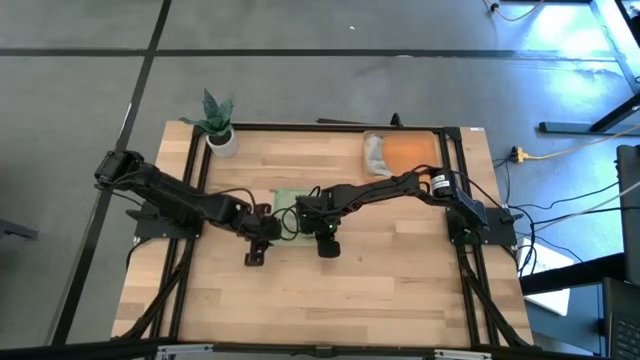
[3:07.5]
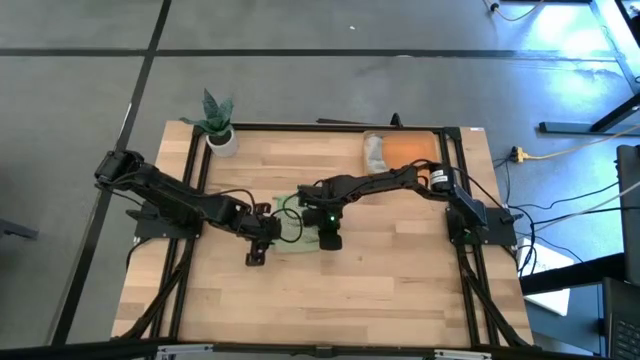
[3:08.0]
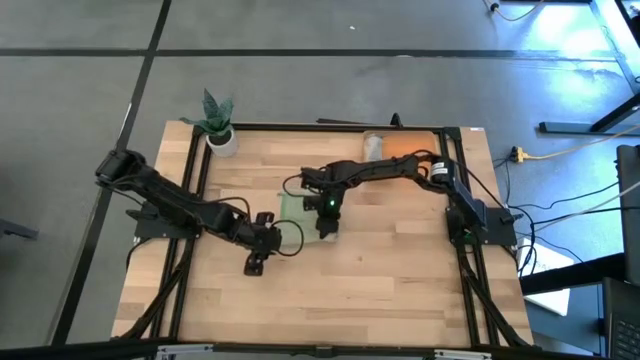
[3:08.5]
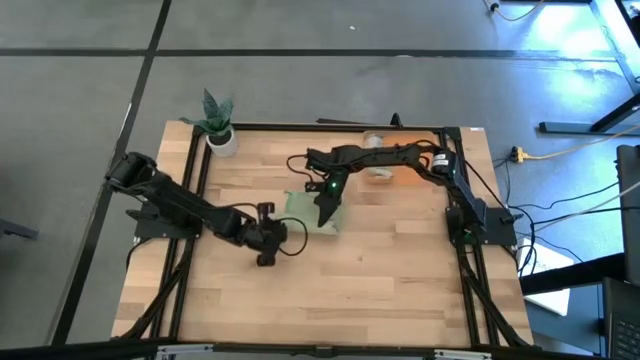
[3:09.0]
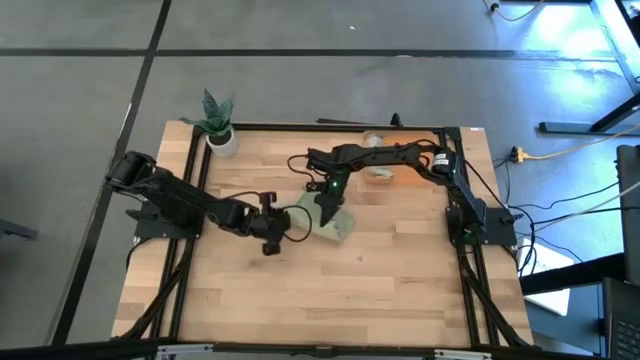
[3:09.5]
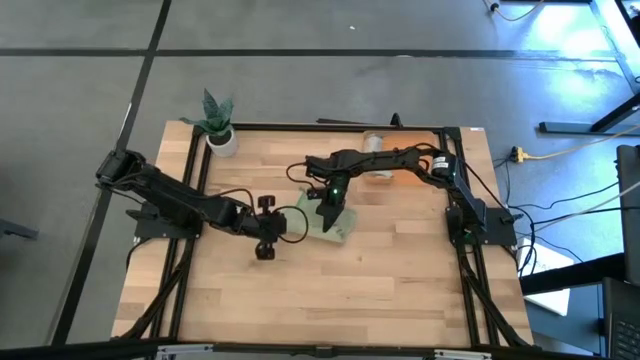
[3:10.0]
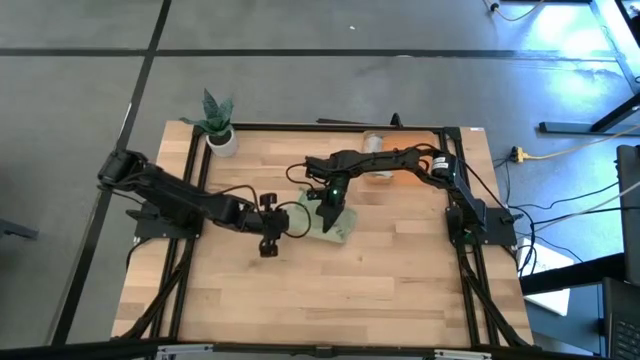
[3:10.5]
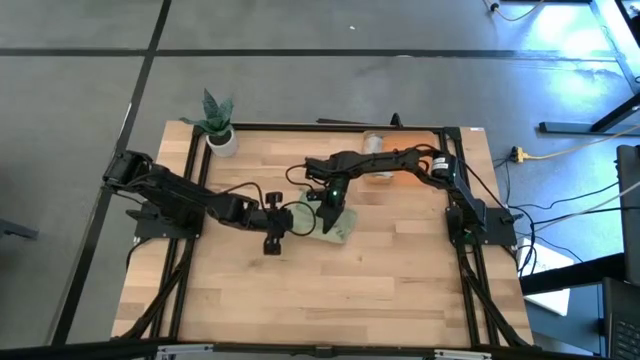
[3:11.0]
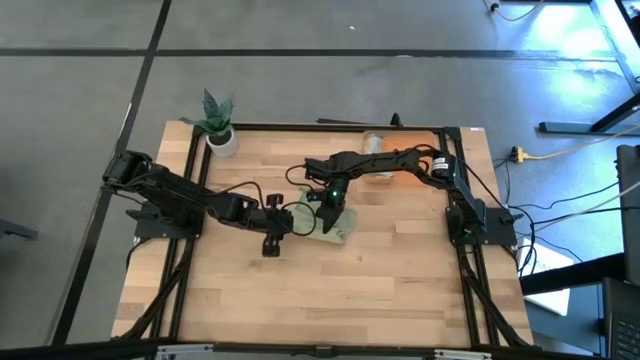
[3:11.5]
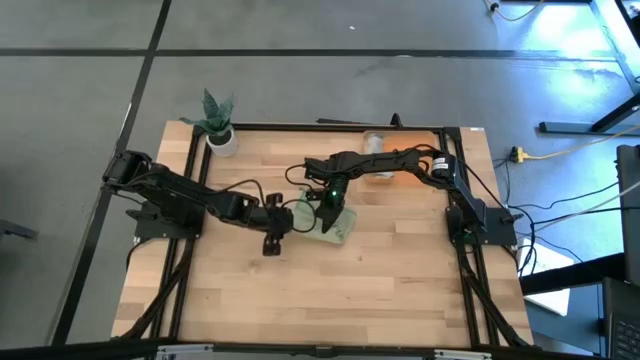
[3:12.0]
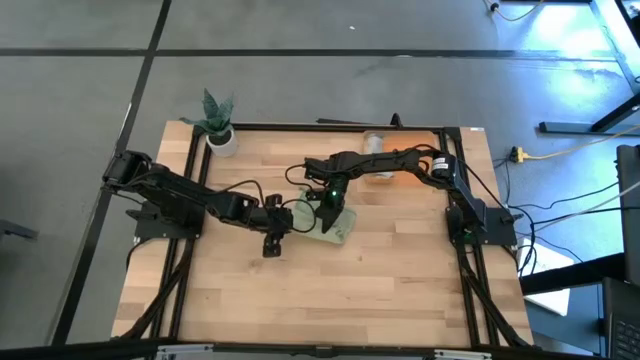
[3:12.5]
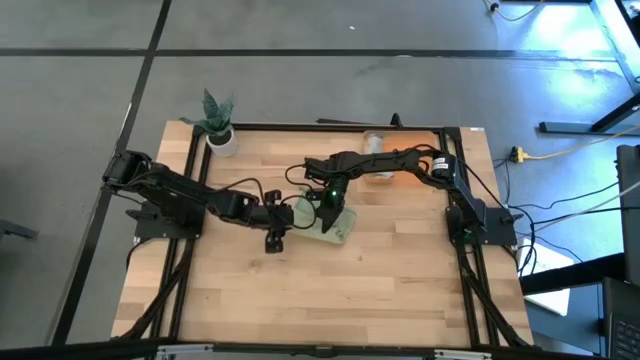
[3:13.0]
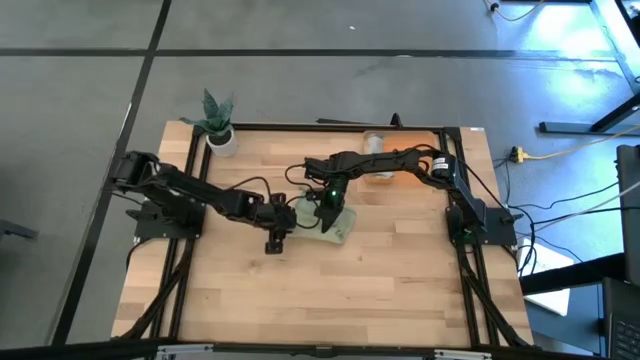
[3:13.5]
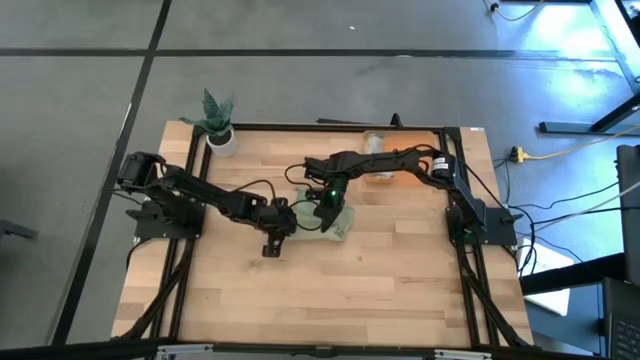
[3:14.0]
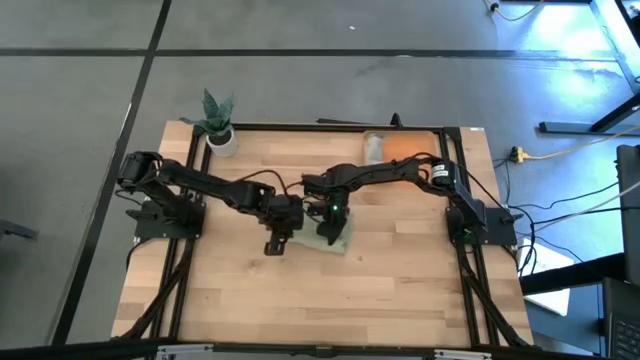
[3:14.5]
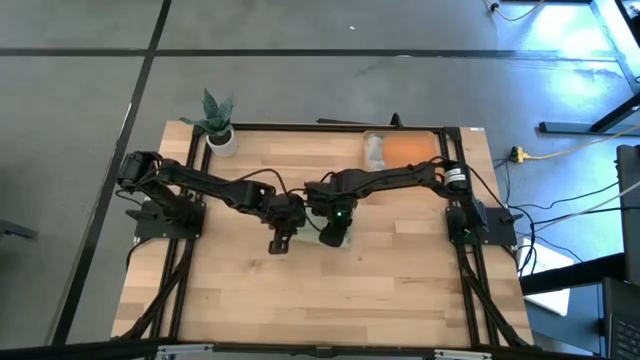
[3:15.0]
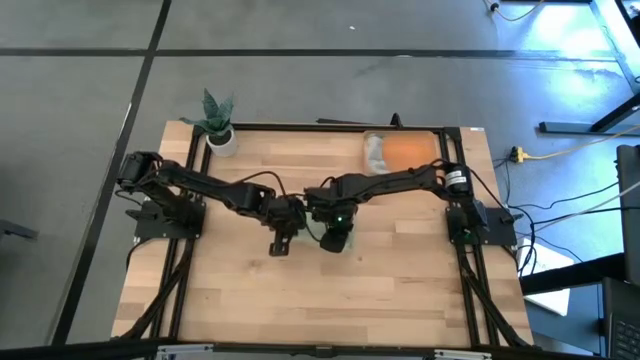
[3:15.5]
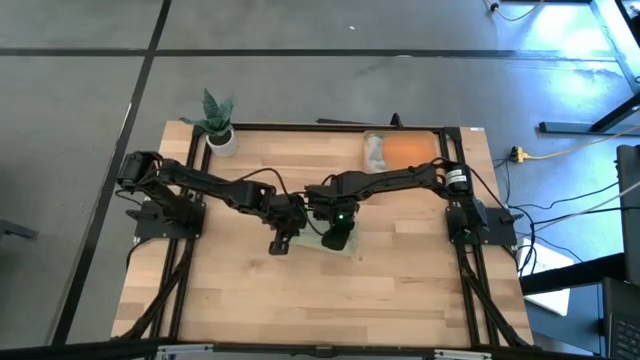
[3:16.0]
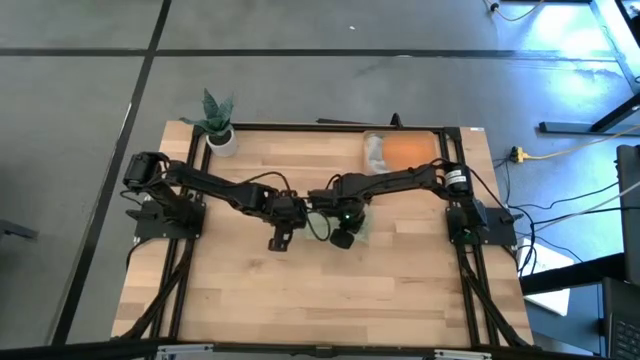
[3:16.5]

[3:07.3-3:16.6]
Task: Roll microfiber towels into tight, uniform cylinder then place into a basket
Roll the green microfiber towel

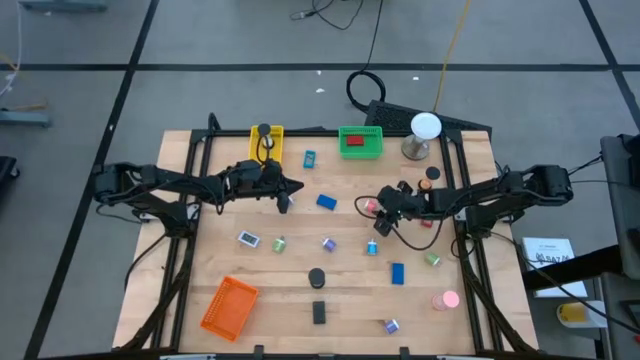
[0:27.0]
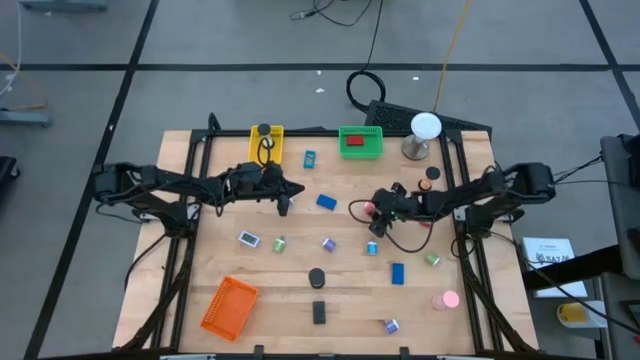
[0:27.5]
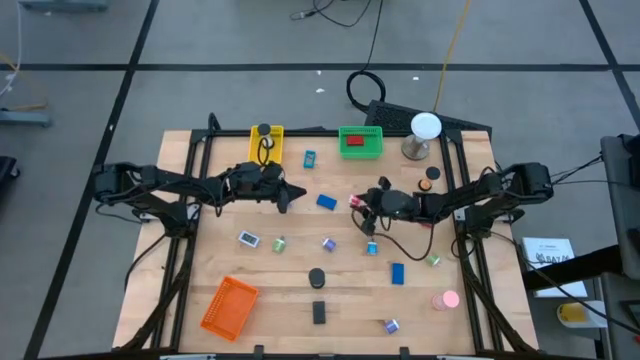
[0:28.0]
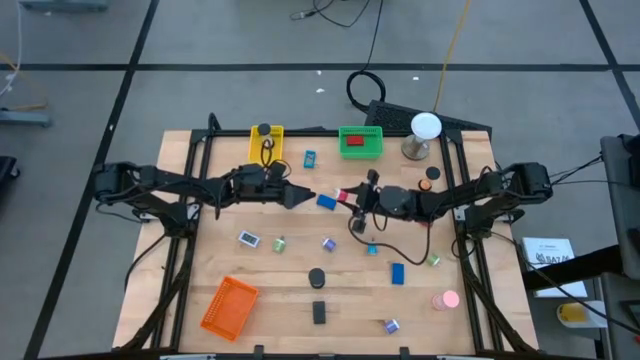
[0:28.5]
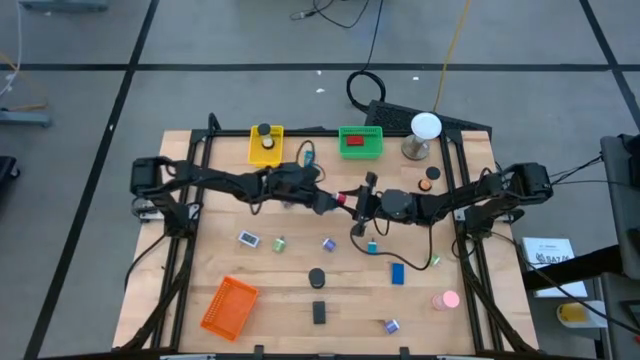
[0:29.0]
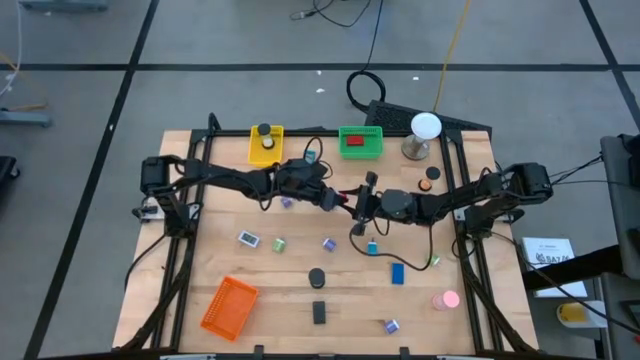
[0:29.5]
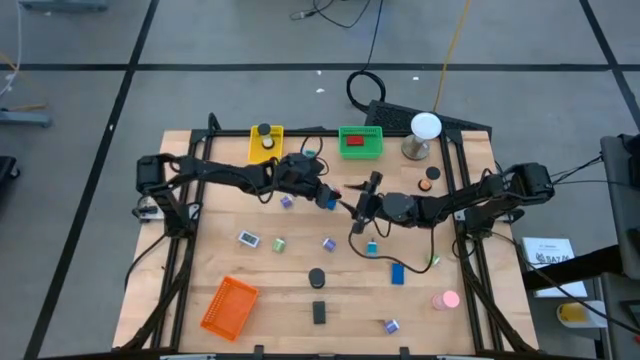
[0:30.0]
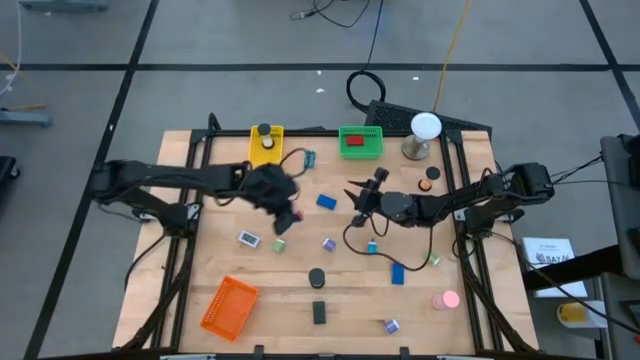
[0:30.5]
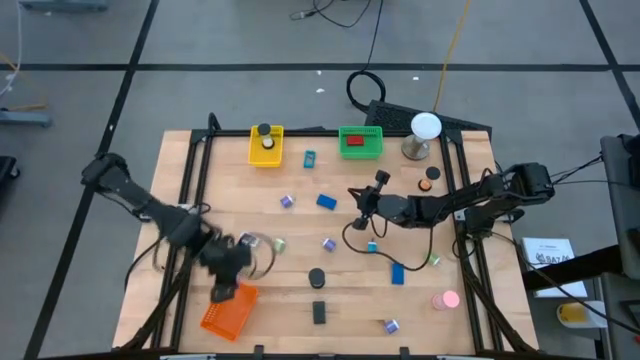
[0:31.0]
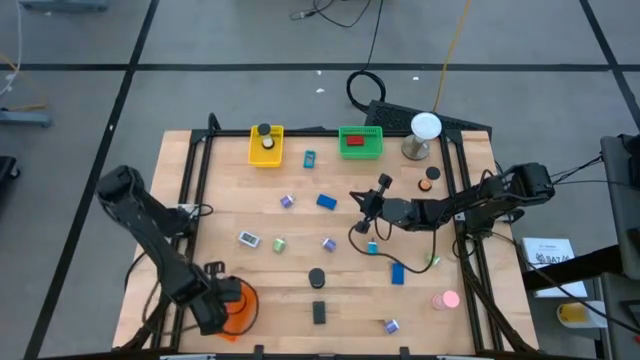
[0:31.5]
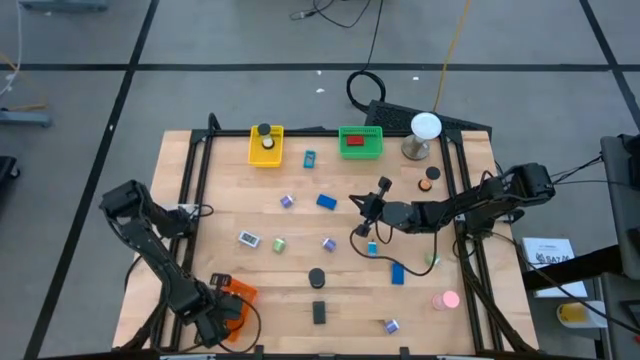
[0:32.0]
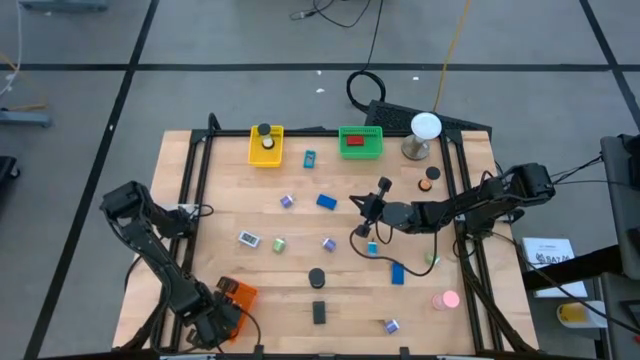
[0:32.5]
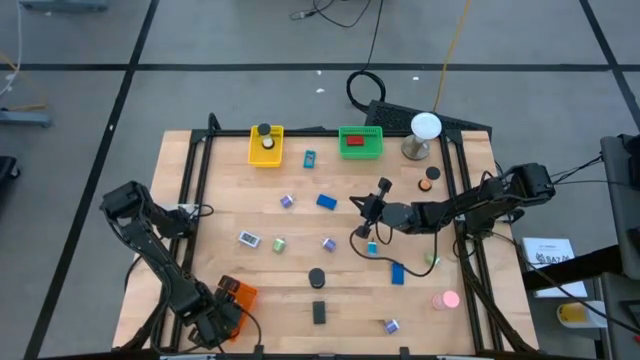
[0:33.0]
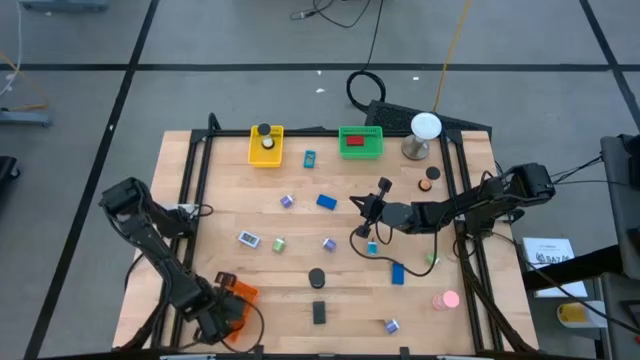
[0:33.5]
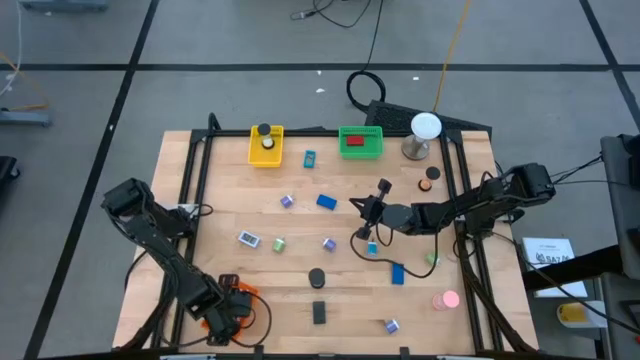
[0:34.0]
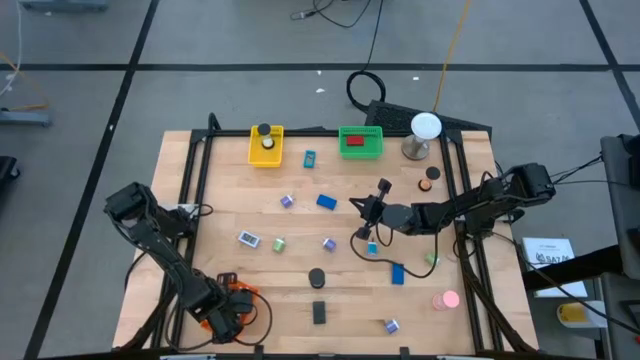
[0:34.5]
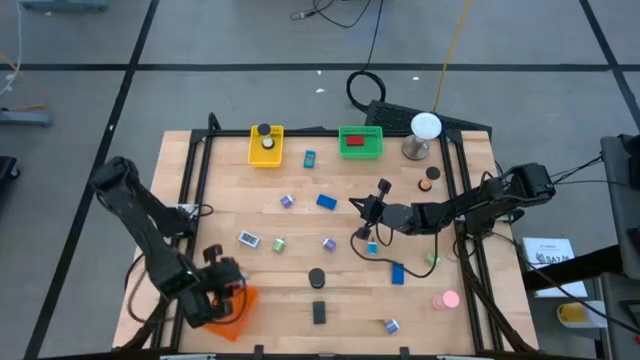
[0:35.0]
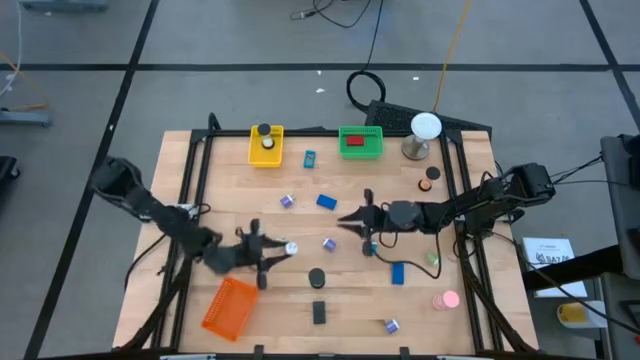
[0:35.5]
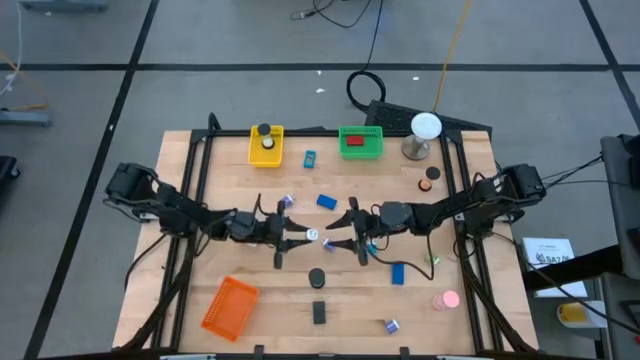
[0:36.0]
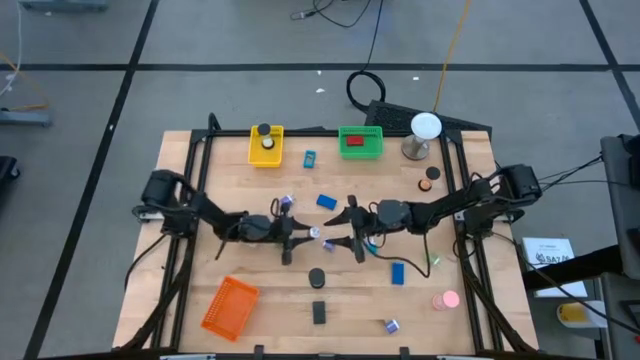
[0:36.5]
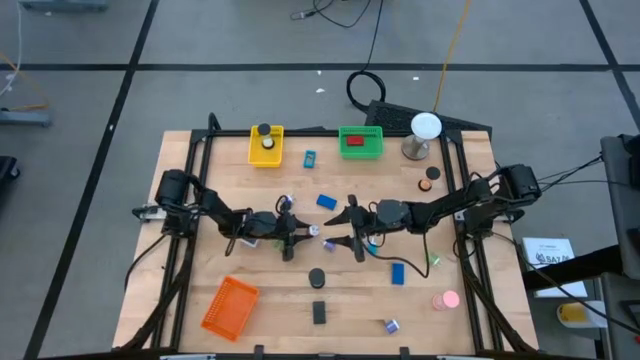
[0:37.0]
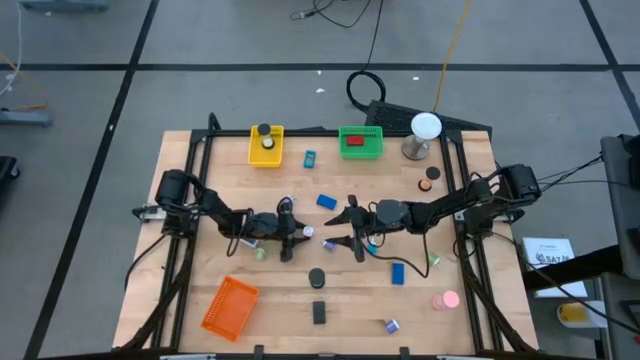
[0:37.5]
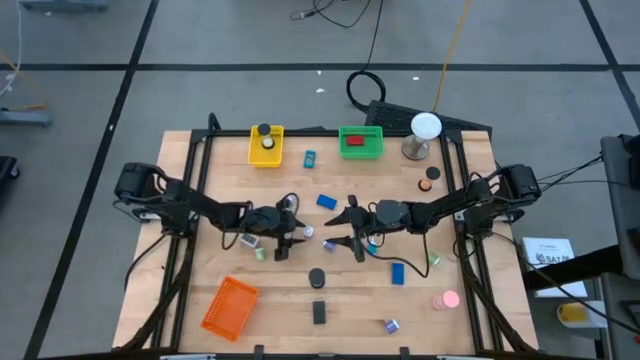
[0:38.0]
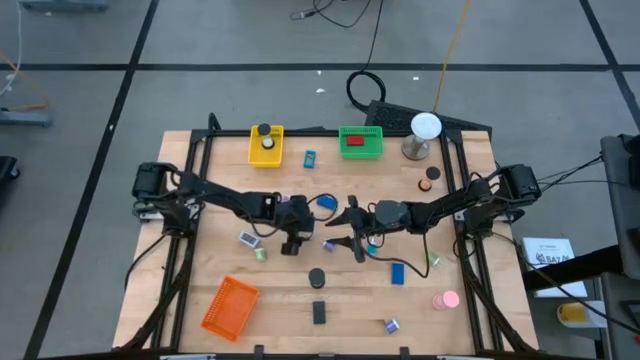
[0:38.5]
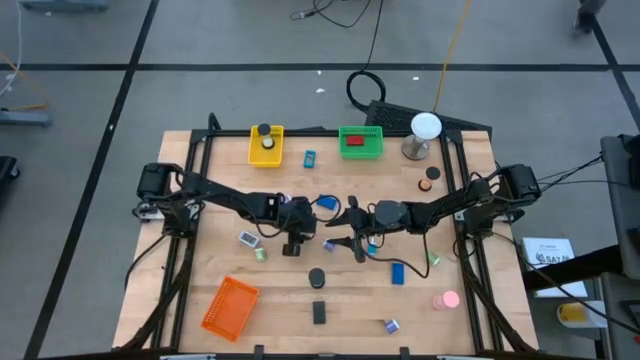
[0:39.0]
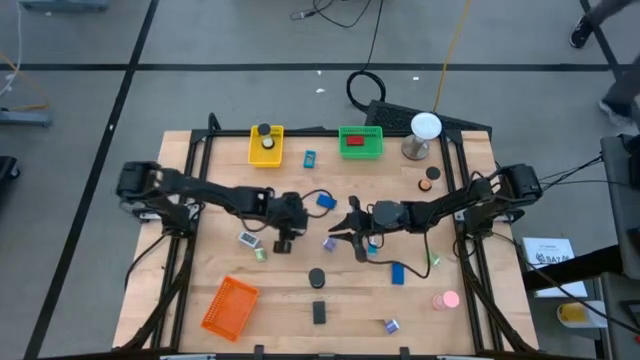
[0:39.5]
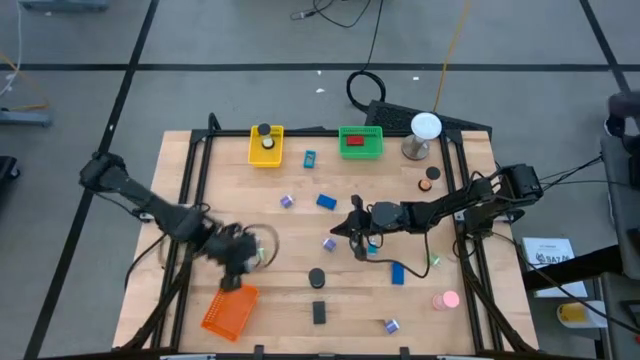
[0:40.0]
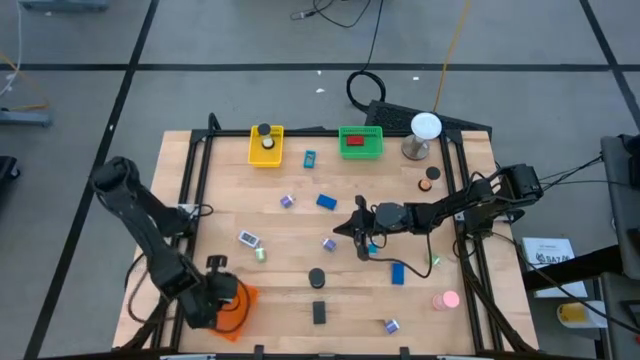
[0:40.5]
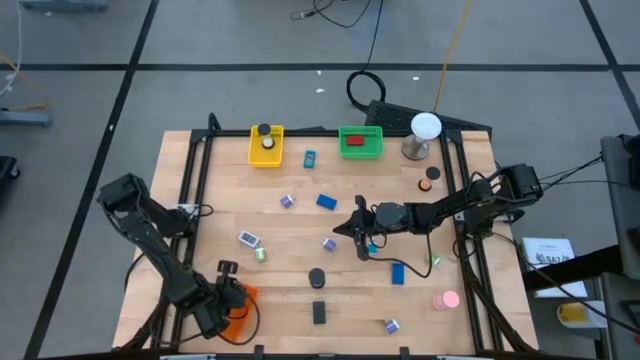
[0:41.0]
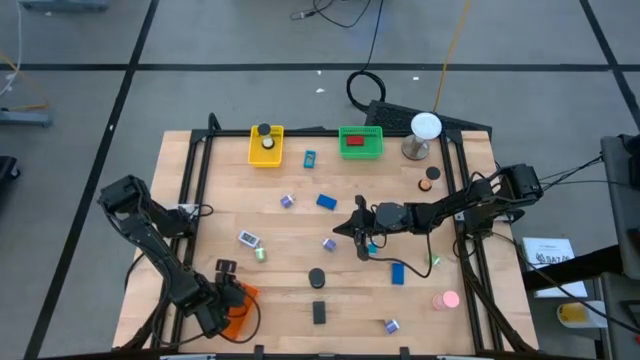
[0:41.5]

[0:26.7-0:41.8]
Task: Pick & Place Office items
Put the pink charger adapter into the orange bin
